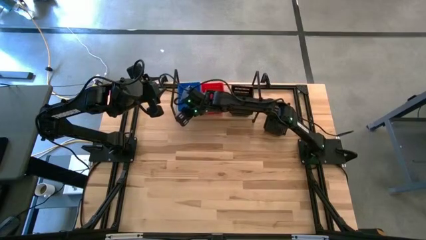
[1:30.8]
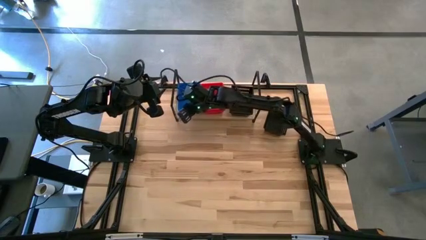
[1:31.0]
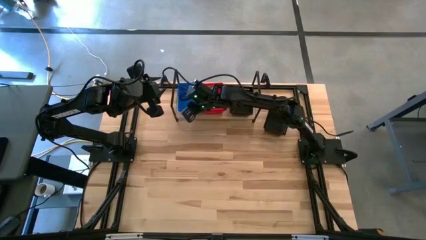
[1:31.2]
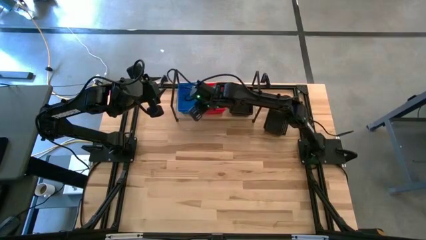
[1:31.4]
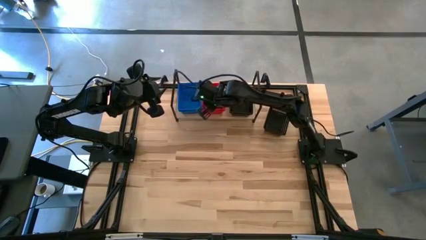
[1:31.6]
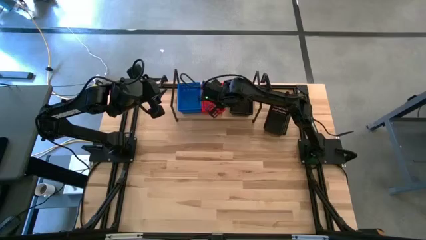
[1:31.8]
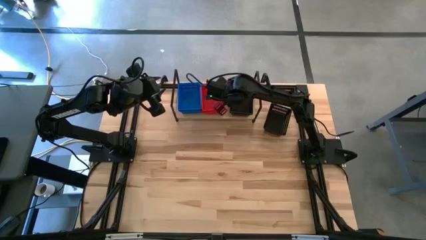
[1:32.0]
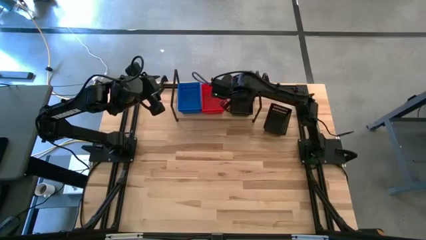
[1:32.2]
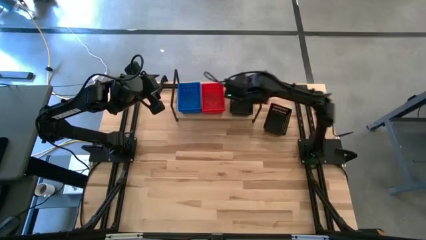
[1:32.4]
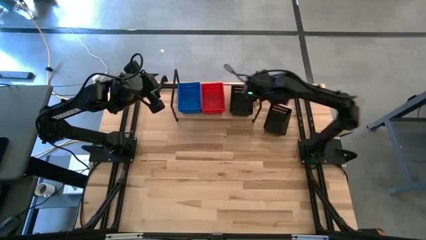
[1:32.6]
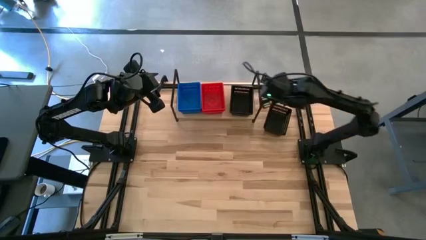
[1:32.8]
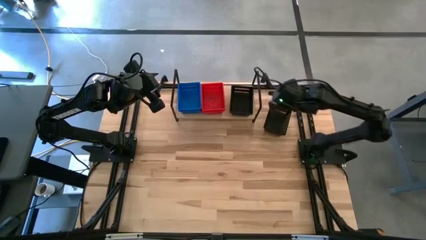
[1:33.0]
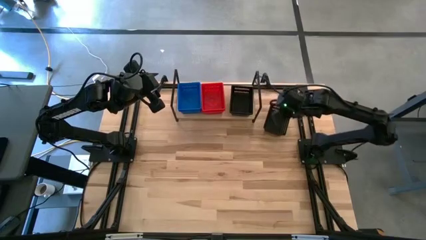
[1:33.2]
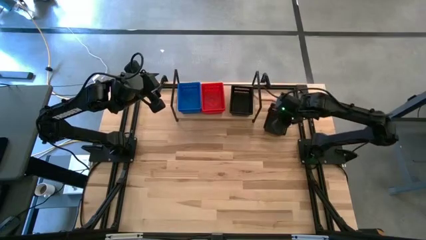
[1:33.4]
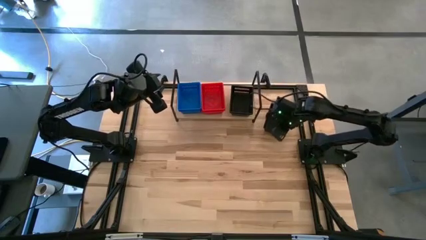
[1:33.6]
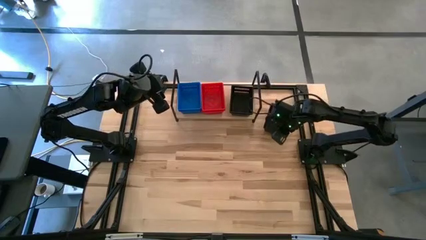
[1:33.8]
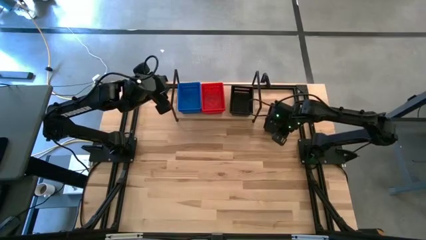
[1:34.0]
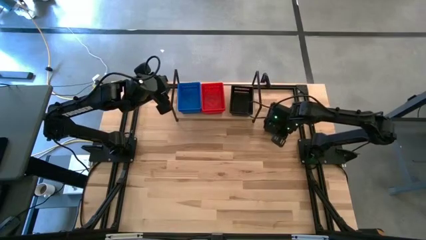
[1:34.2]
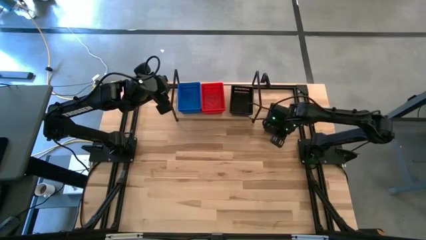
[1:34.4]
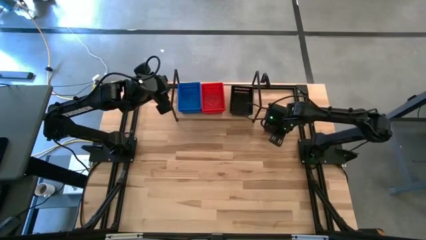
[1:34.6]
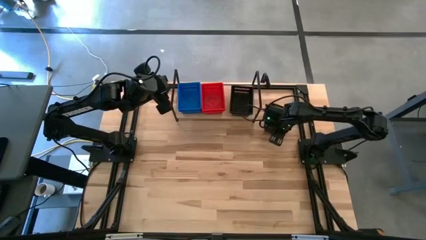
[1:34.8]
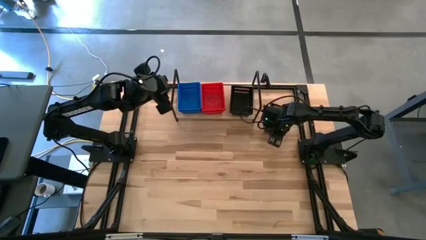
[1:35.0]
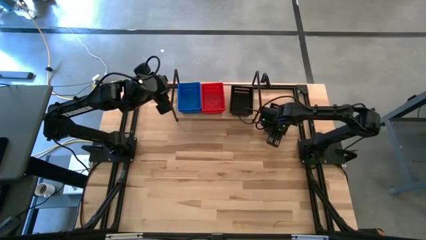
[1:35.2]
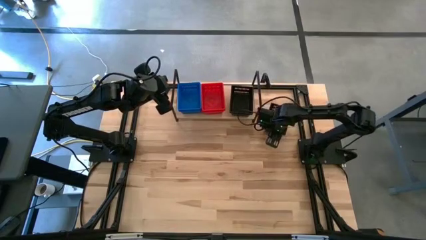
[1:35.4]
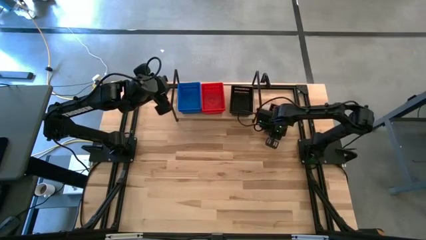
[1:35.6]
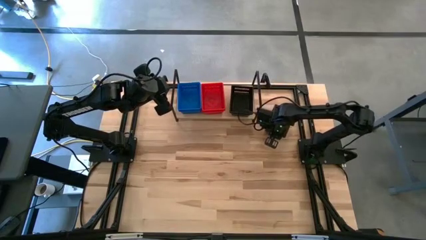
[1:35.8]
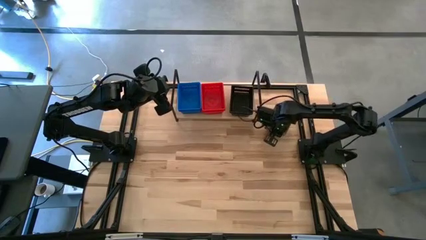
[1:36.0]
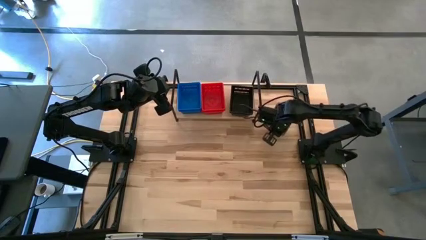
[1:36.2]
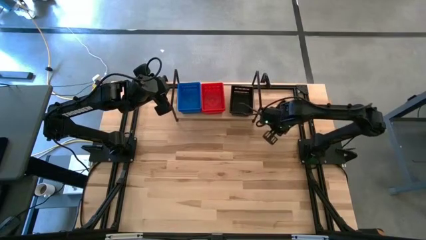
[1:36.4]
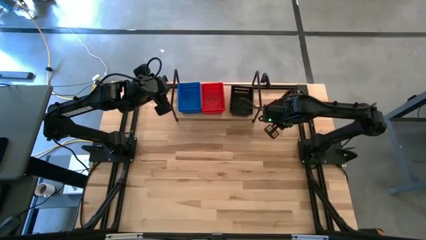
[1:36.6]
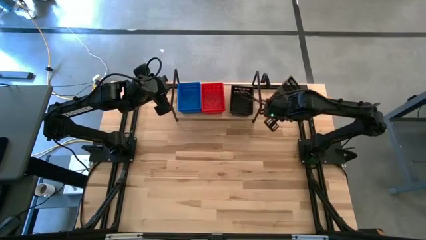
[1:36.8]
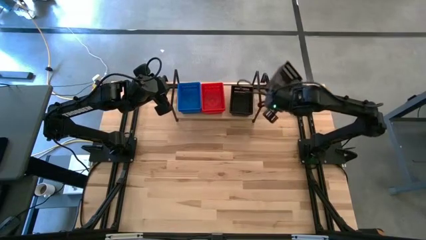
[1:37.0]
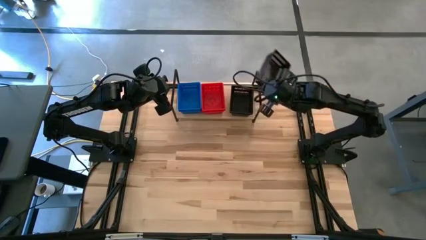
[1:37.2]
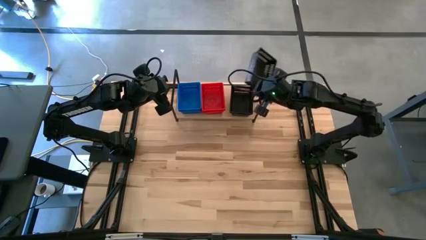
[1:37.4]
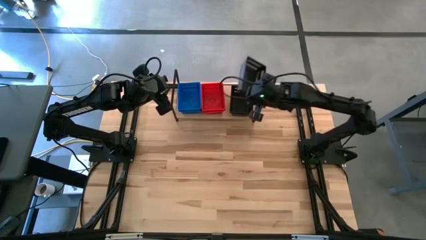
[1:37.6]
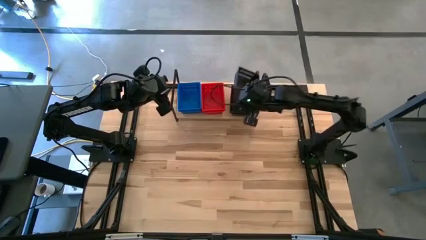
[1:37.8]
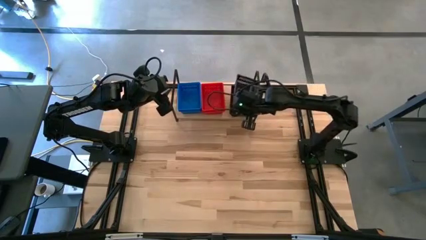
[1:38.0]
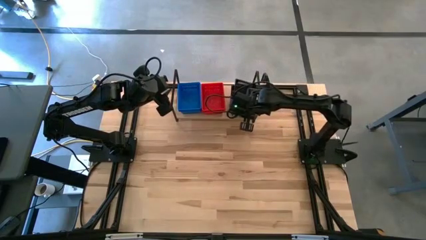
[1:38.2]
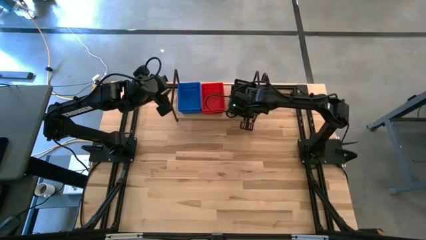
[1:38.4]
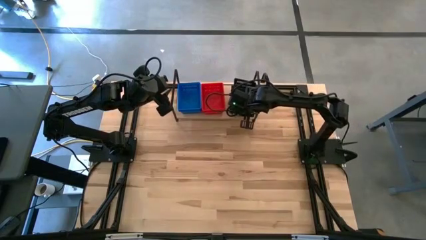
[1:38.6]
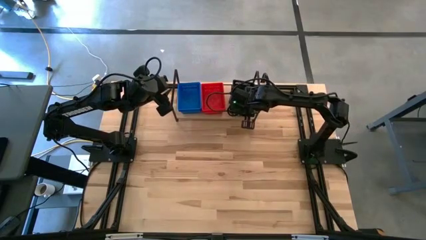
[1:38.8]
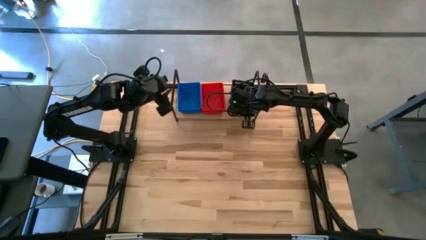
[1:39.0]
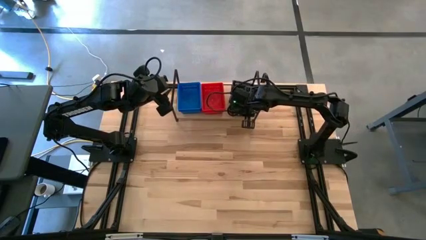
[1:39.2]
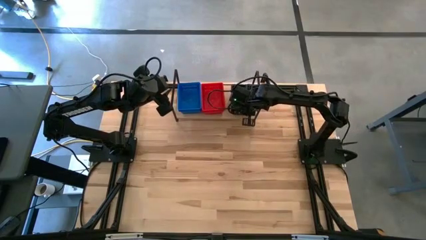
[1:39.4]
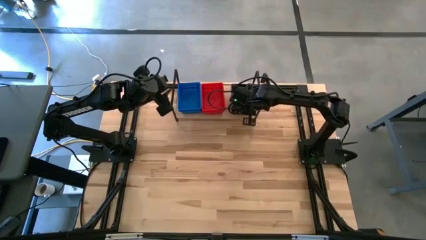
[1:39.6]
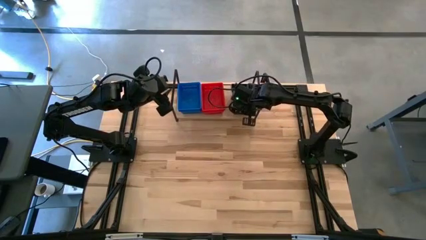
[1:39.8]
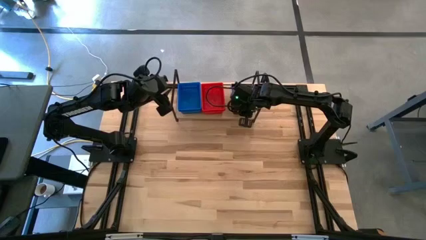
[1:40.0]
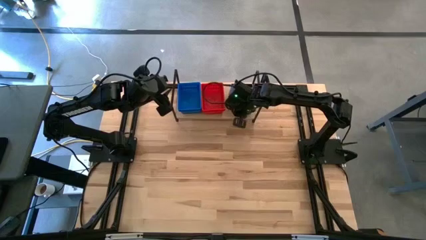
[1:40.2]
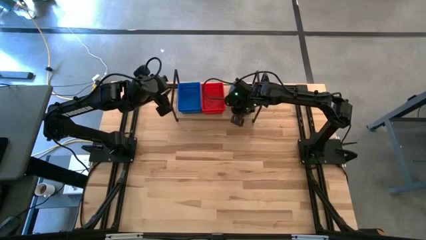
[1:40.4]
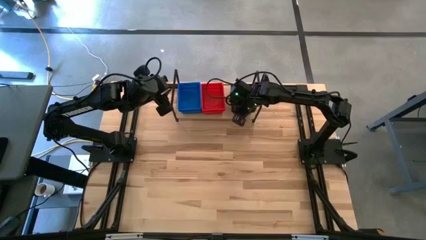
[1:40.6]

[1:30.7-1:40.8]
Task: Stack baskets on shelf by color
Stack the black bin on top of the black bin on the shelf

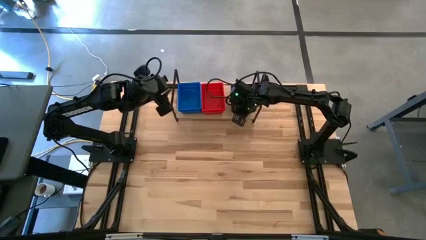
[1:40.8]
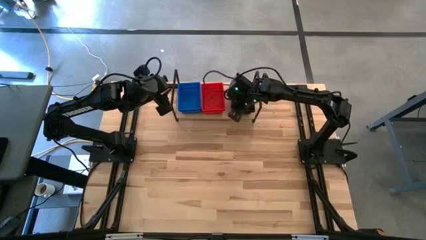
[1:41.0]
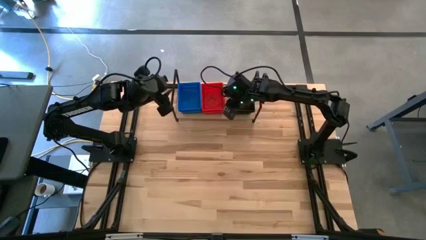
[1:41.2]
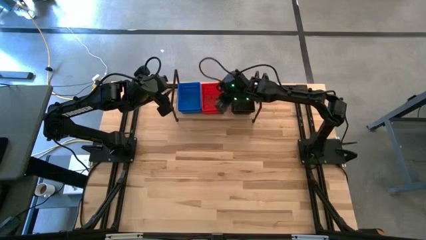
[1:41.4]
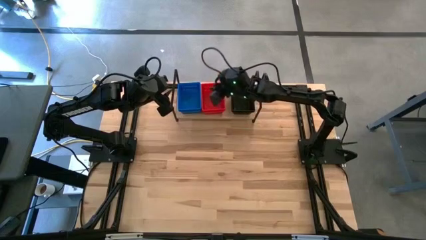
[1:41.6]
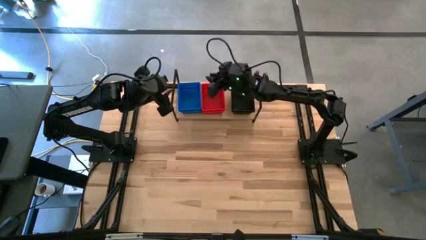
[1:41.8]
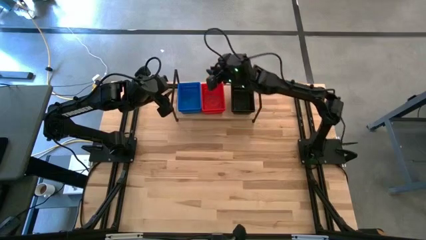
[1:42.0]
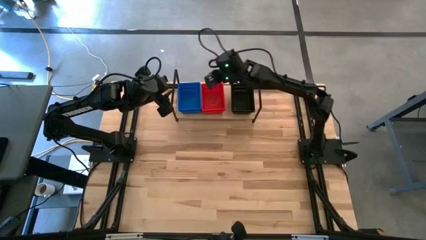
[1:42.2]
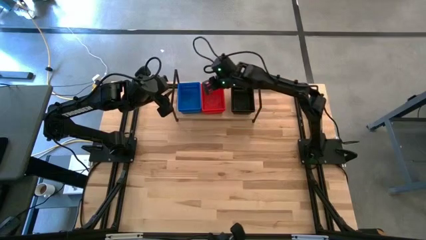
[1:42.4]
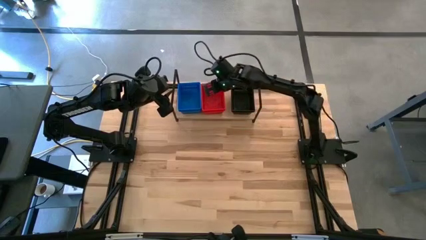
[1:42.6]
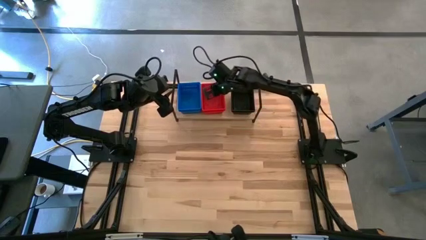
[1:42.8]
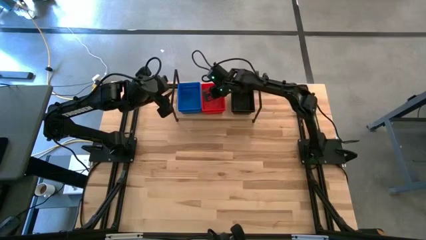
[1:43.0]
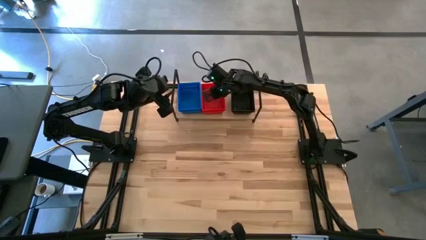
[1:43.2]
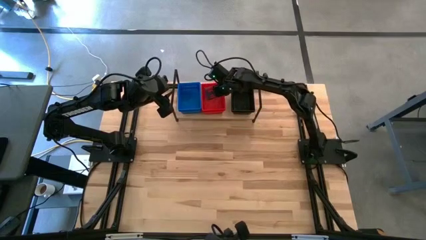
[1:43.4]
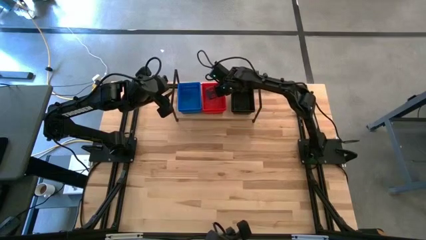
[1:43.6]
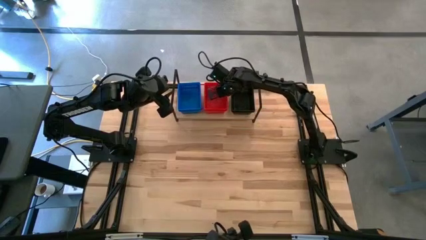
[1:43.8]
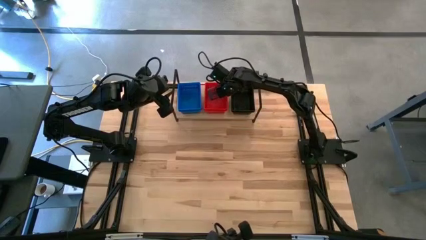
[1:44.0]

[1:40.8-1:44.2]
Adjust the red bins on the shelf

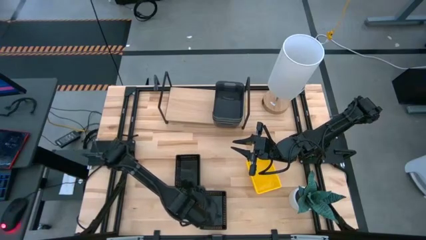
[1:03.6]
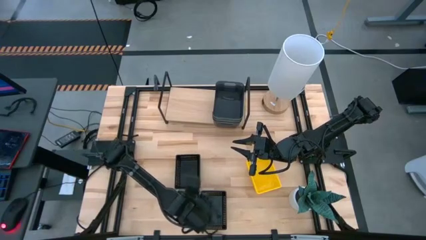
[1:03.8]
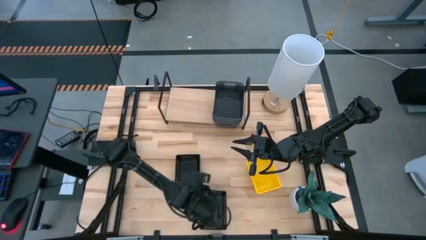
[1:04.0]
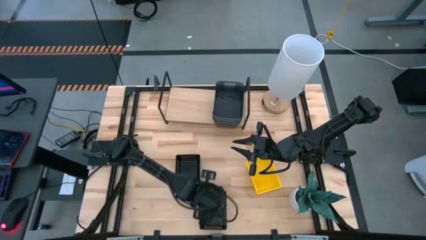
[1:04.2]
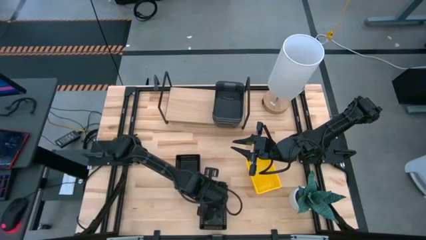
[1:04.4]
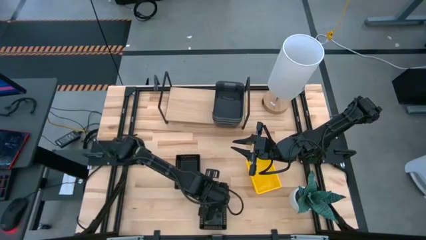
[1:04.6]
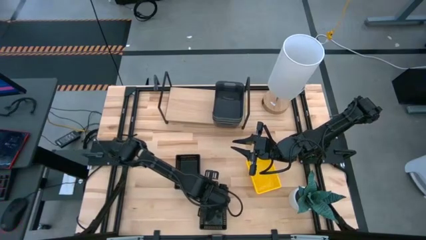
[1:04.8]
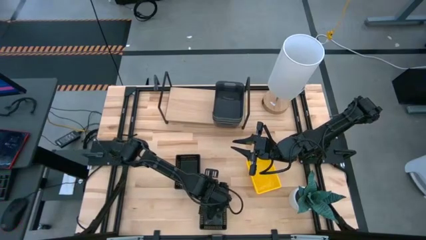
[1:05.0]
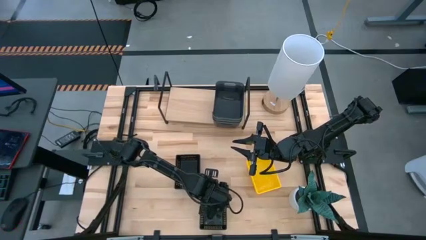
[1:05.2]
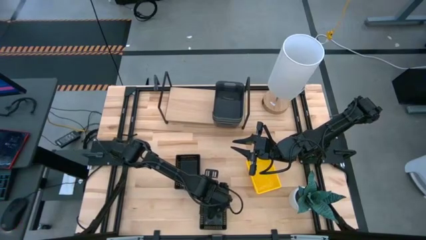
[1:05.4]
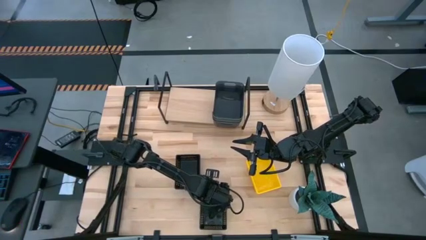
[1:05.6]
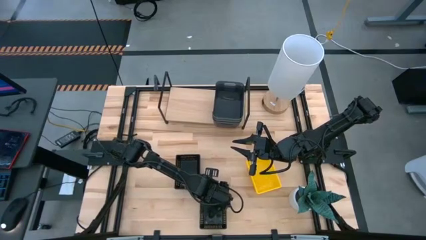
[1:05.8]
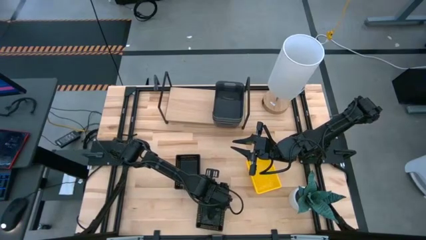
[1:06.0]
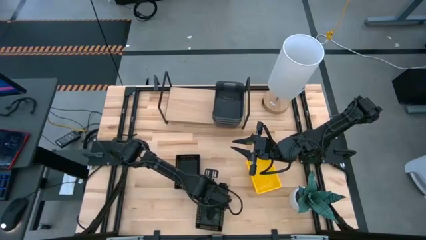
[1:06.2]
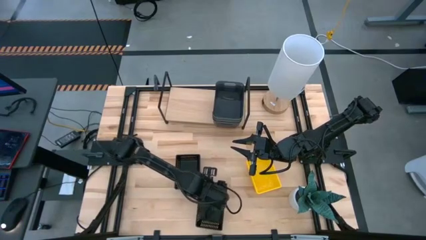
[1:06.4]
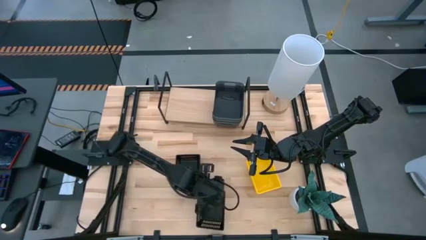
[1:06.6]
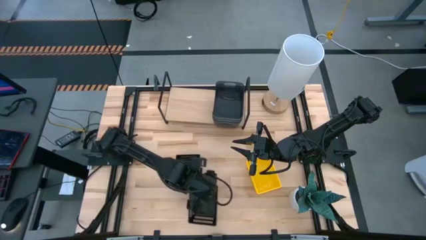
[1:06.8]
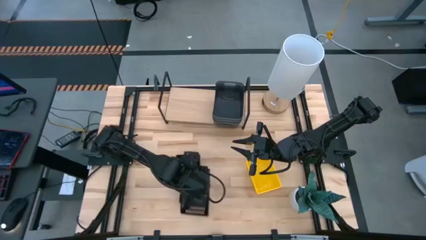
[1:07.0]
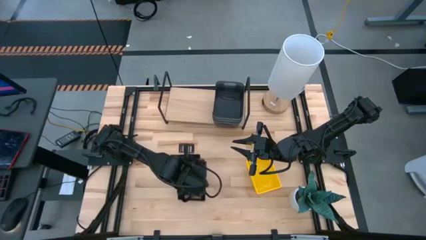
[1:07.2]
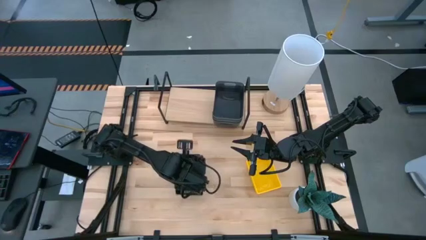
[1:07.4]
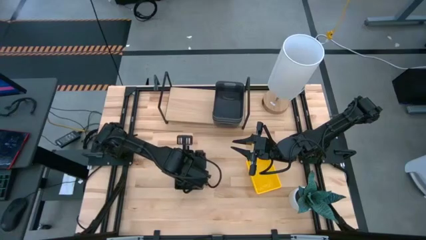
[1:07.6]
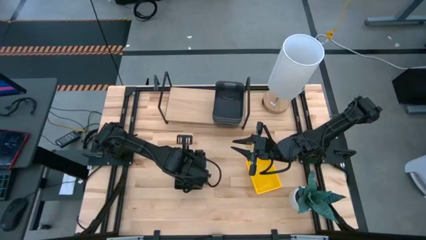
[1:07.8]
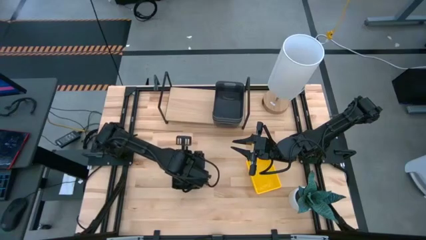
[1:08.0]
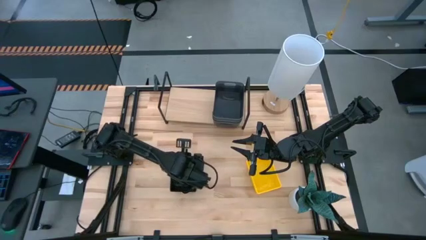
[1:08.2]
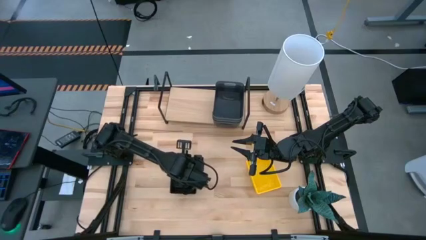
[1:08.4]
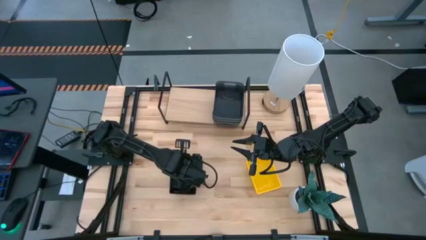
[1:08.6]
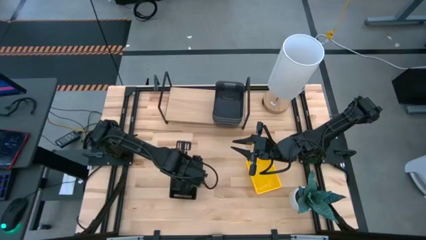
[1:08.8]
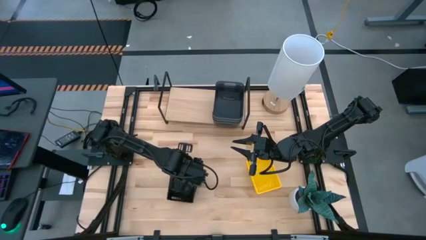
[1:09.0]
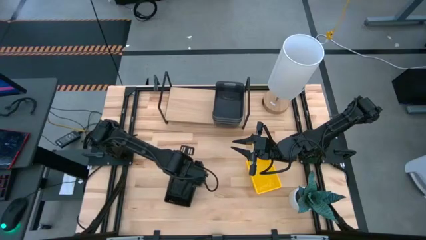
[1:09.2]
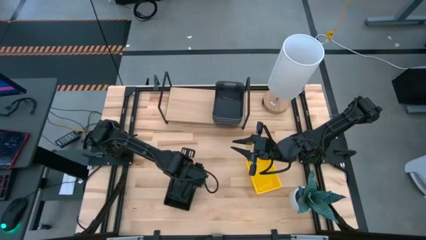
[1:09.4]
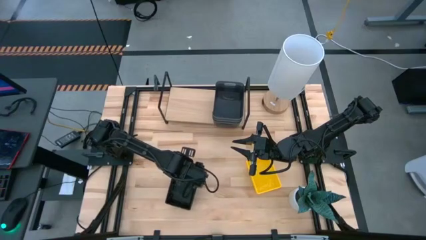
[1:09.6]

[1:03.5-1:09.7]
Task: Stack baskets on shelf by color
Stack the bottom black bin on top of the other stacked black bins
